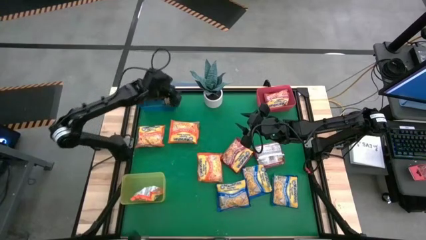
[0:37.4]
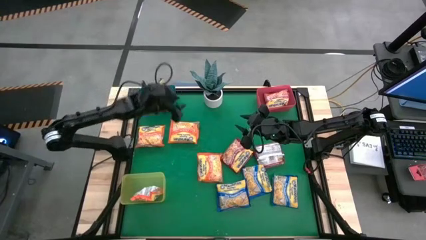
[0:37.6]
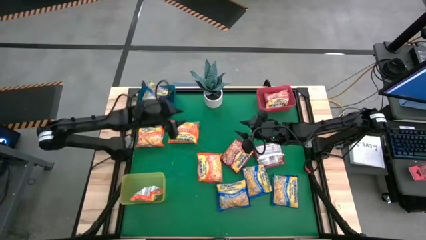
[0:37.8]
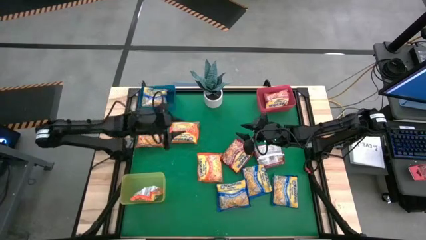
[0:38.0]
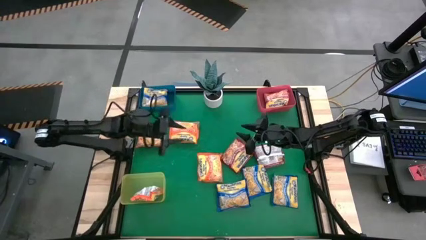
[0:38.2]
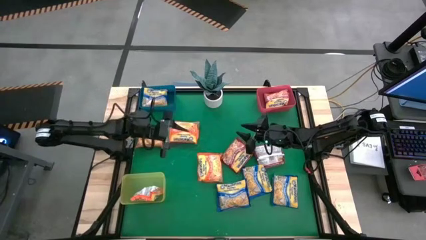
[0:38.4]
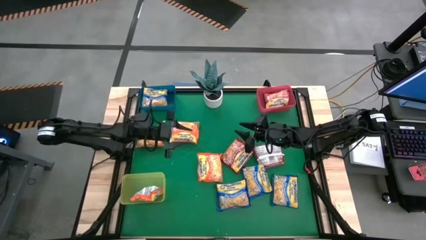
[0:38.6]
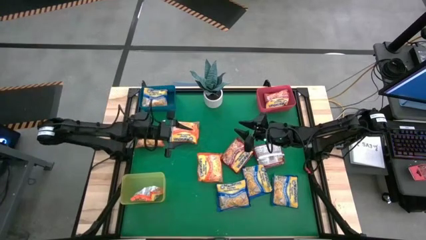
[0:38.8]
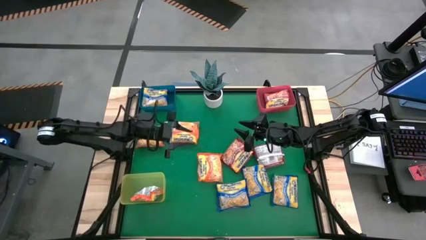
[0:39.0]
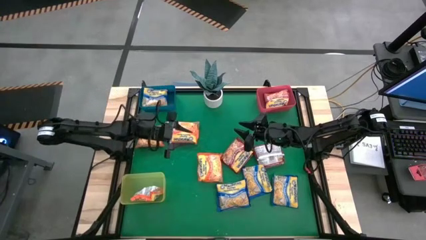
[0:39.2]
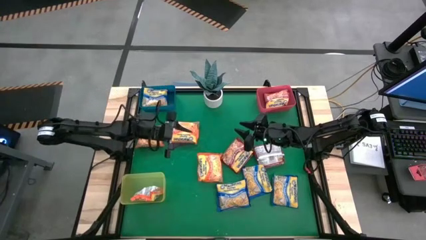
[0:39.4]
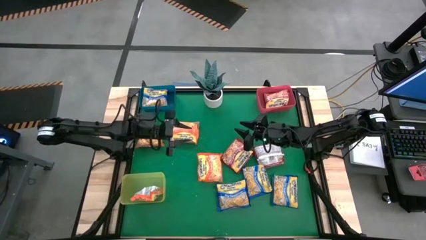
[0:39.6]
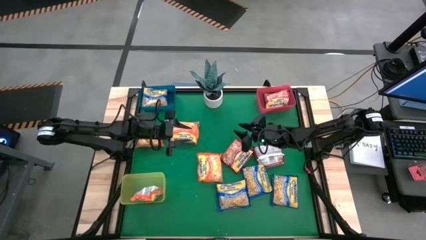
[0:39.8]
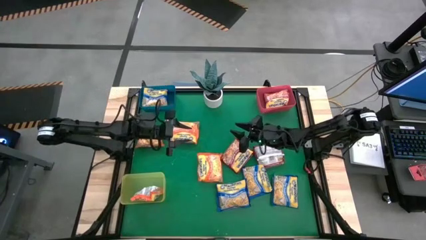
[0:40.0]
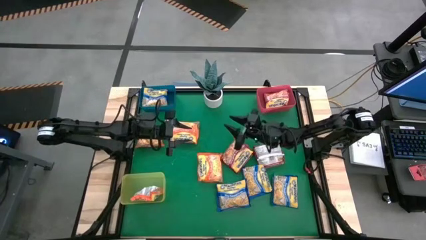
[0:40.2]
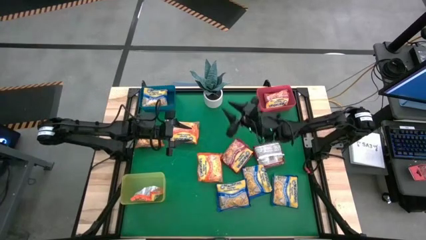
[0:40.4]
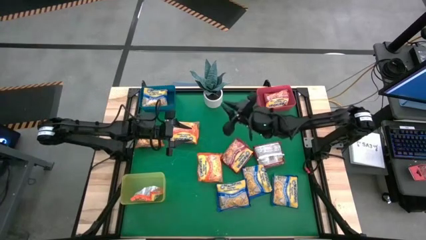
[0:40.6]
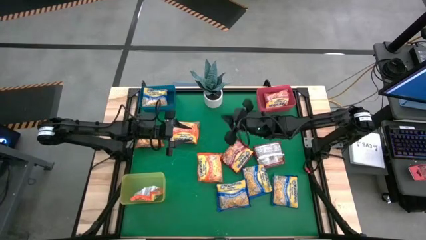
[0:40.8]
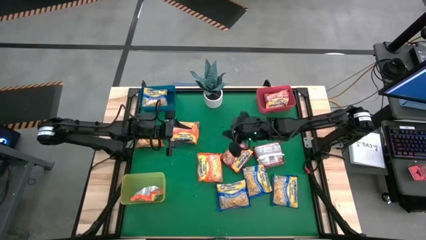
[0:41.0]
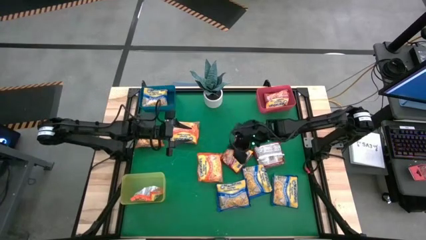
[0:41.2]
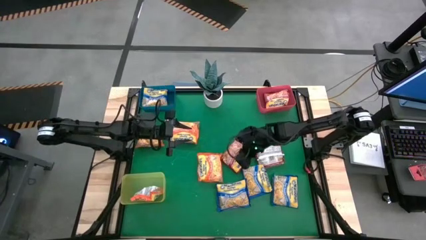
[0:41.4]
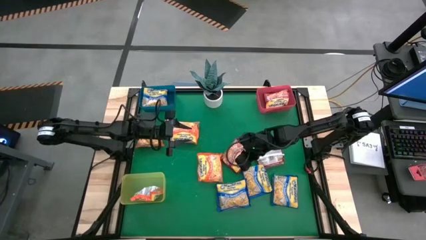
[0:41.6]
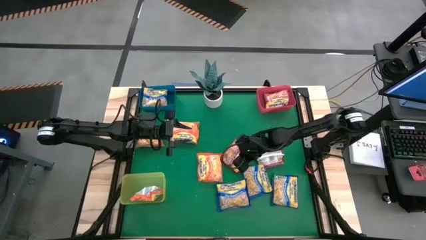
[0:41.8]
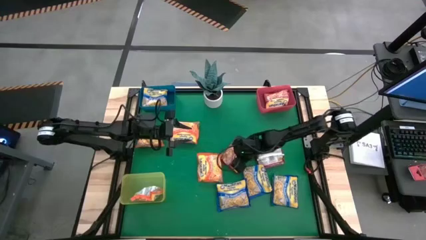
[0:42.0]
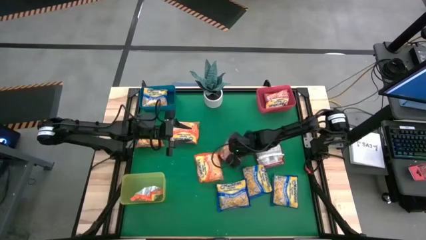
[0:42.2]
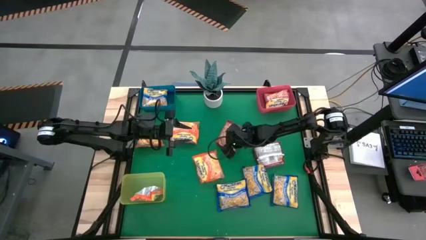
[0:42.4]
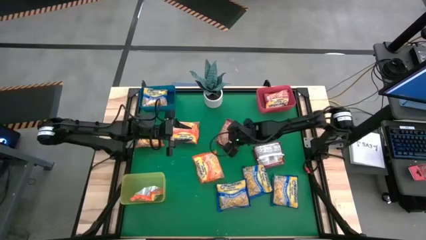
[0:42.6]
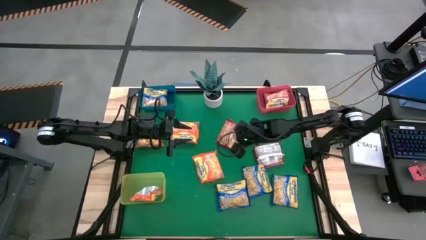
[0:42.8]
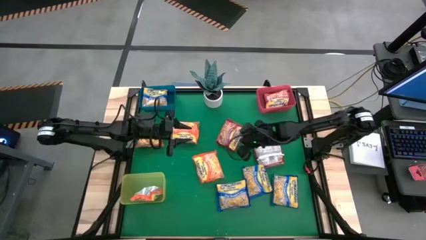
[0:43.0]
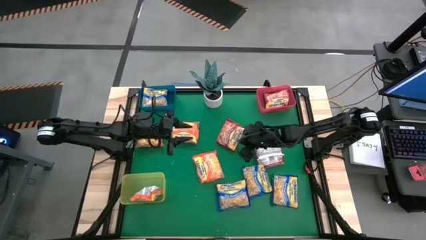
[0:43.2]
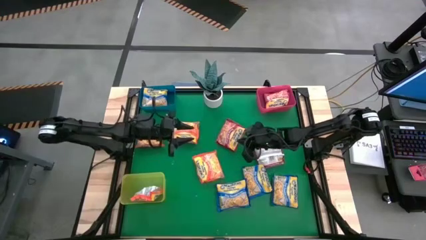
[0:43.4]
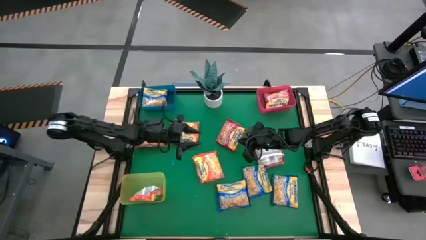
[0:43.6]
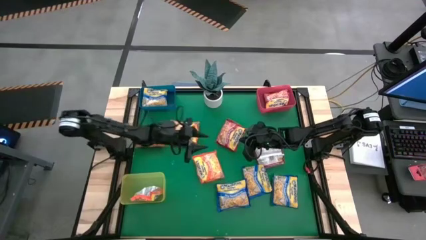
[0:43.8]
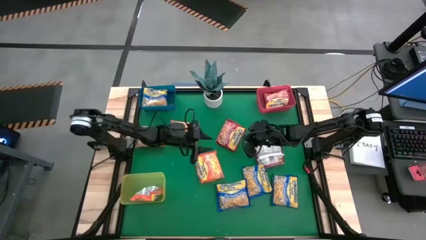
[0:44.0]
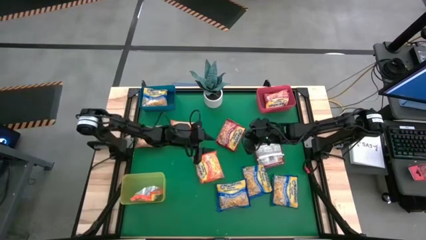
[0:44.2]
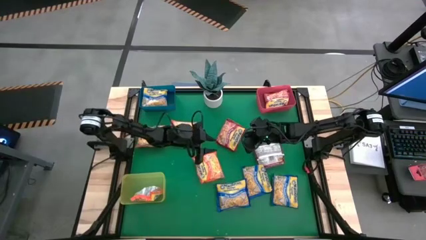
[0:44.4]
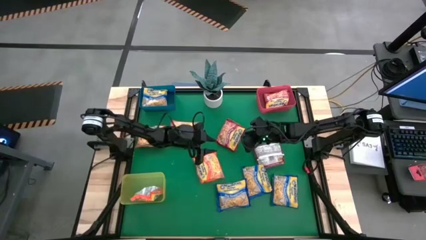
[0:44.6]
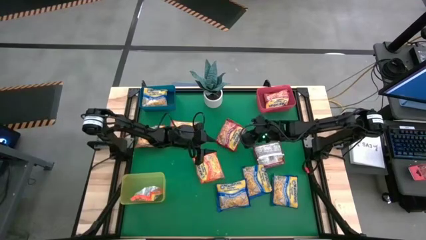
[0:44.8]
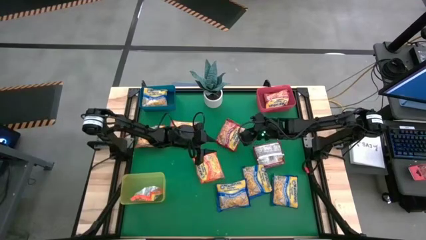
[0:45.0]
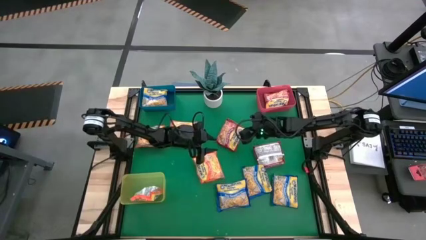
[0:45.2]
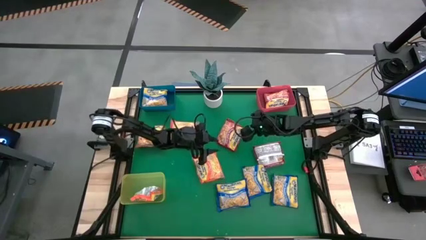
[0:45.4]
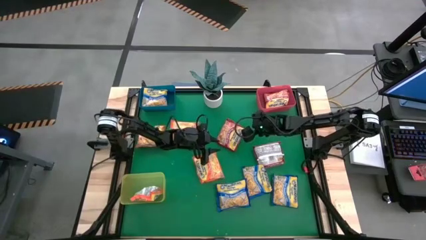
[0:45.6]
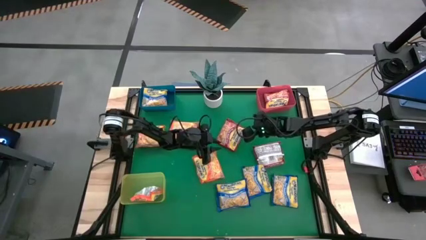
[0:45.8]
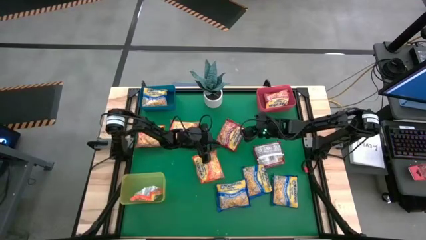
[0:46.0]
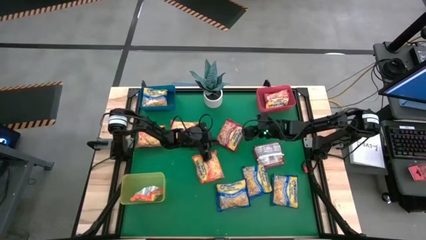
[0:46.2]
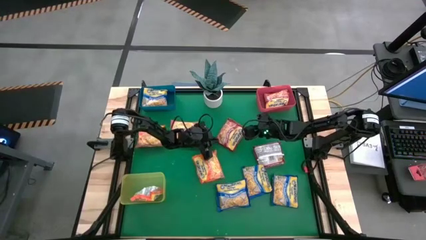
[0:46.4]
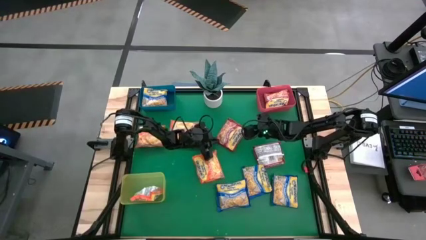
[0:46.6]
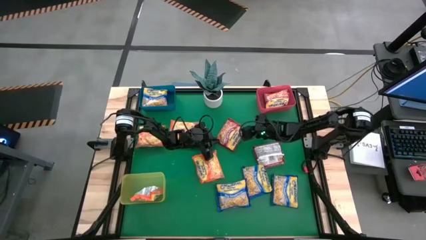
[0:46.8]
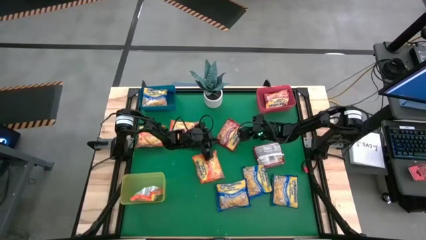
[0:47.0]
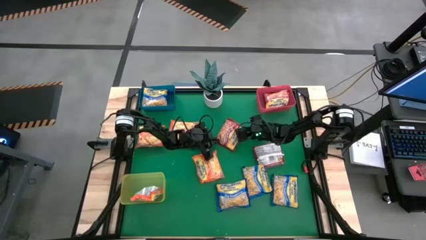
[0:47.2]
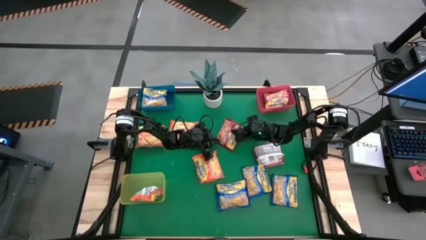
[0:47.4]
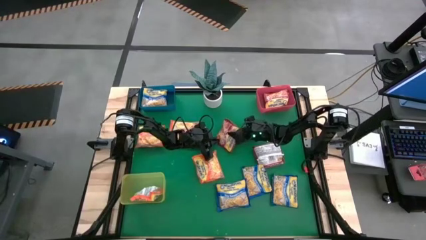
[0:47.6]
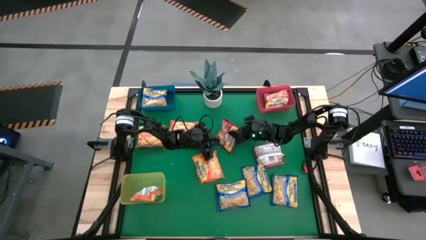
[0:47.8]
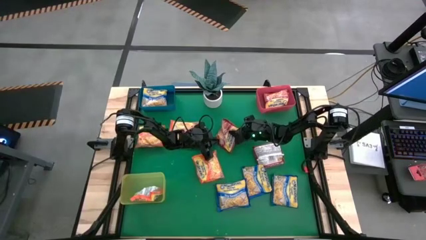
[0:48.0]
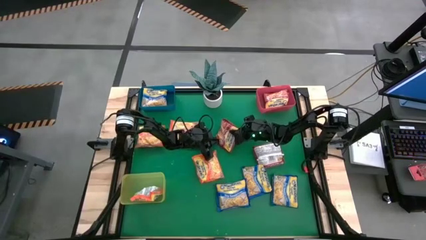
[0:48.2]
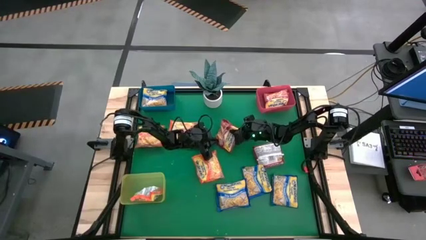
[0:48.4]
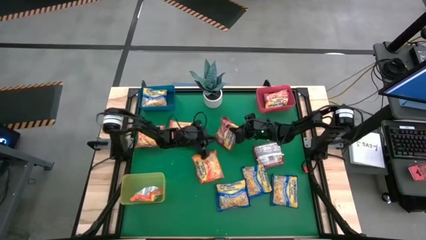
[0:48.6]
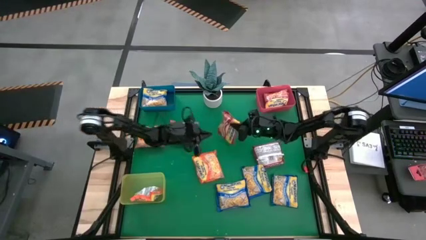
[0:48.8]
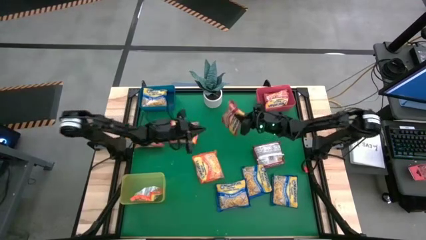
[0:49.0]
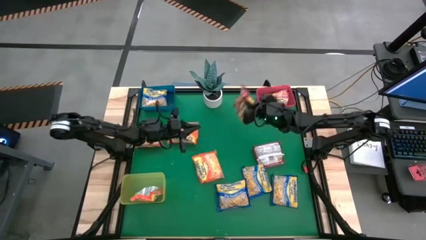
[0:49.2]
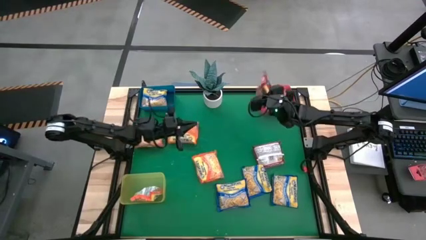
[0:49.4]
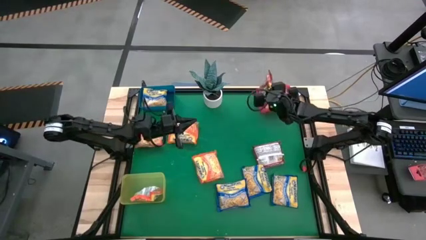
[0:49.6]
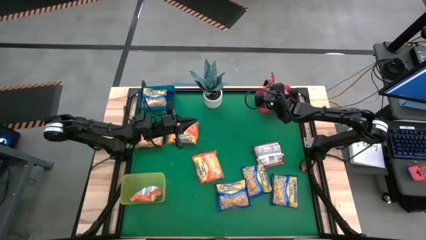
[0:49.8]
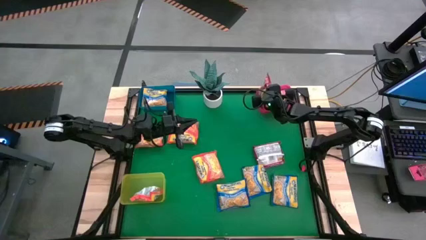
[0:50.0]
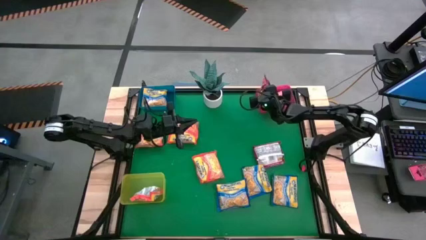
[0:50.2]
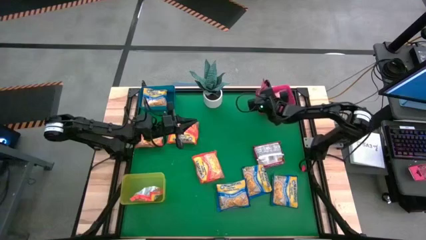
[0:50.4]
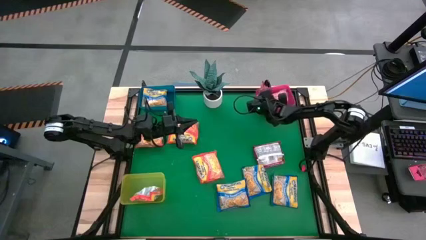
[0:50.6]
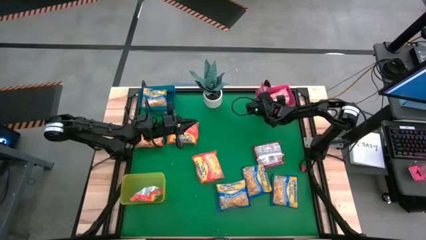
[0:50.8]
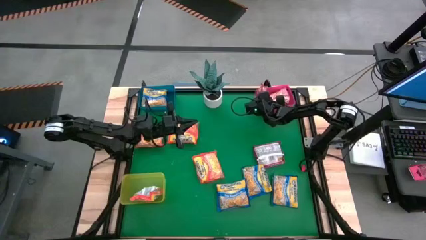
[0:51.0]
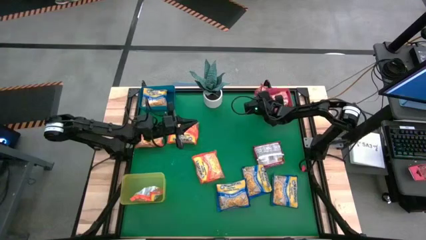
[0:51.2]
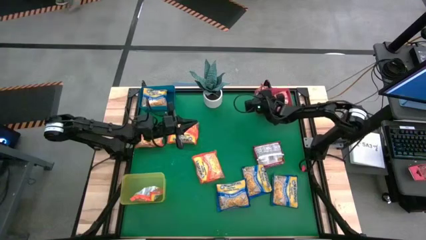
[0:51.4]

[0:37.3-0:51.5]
Task: Sort Maruchan noodles
Put the red noodle pack into the pink bin
